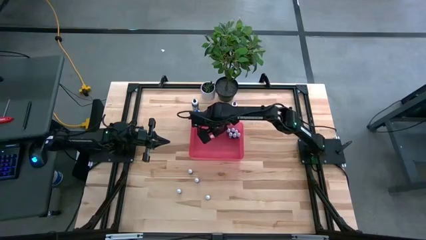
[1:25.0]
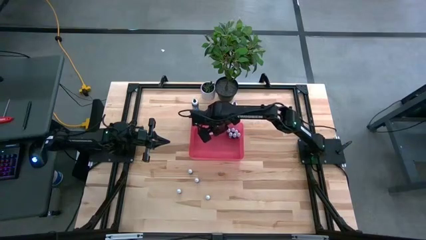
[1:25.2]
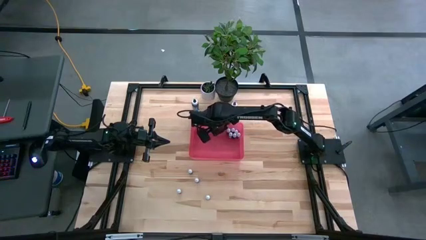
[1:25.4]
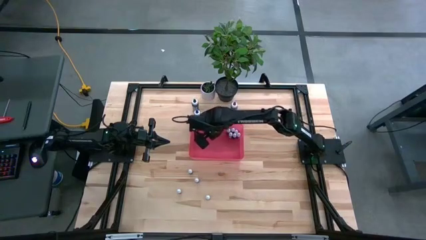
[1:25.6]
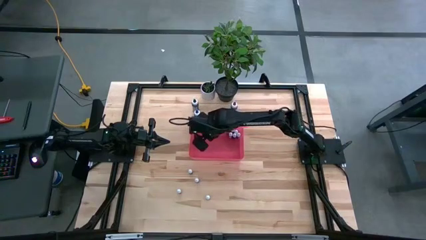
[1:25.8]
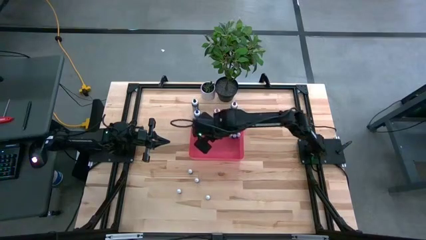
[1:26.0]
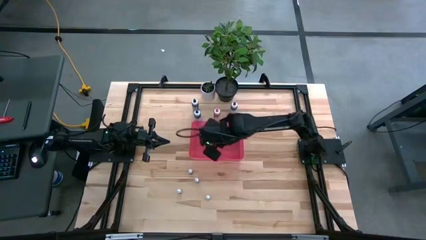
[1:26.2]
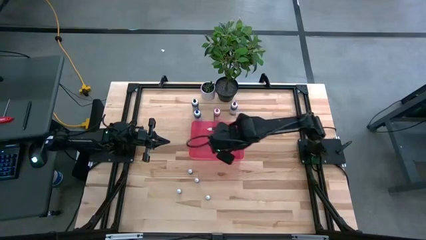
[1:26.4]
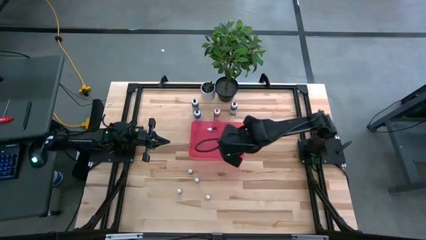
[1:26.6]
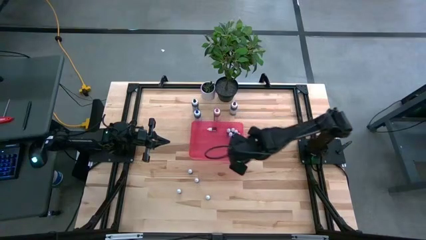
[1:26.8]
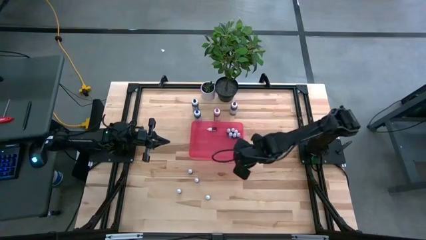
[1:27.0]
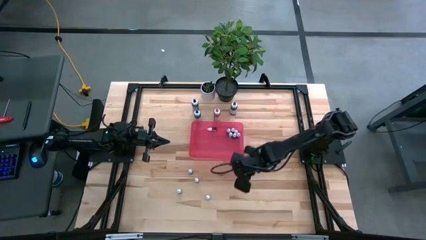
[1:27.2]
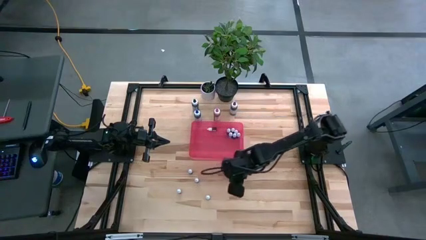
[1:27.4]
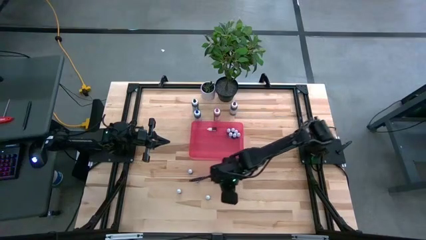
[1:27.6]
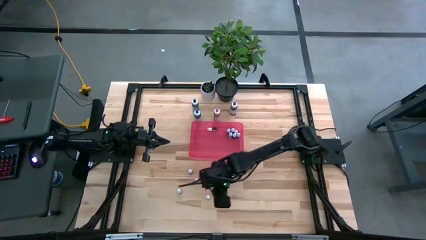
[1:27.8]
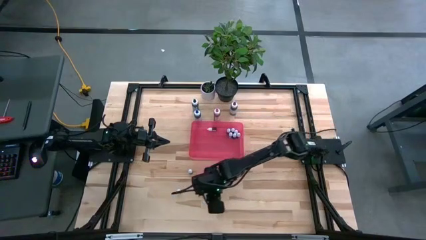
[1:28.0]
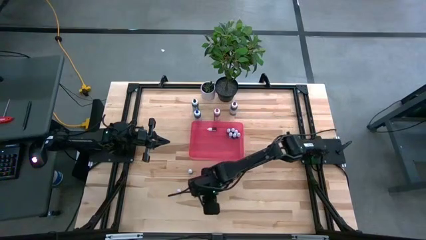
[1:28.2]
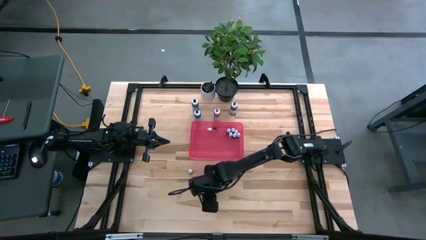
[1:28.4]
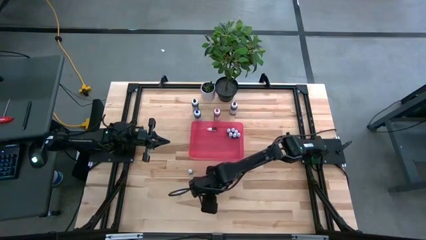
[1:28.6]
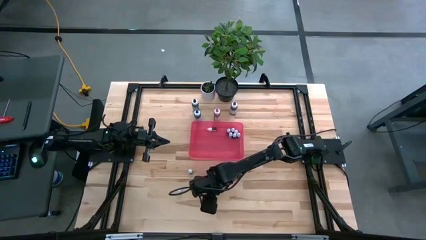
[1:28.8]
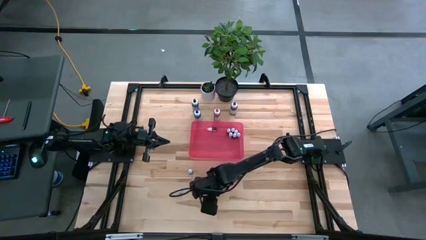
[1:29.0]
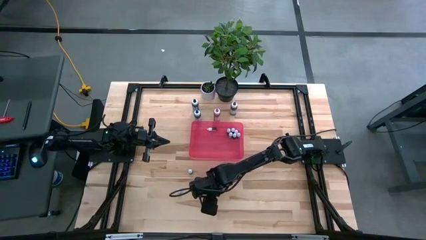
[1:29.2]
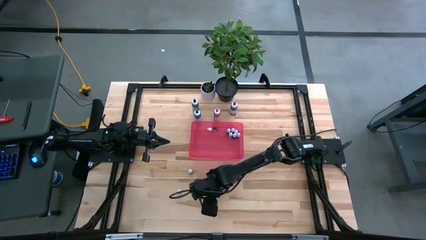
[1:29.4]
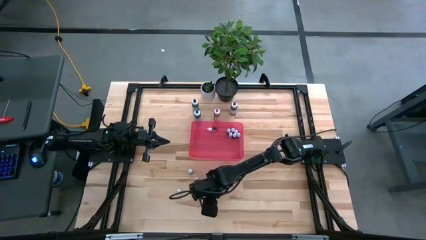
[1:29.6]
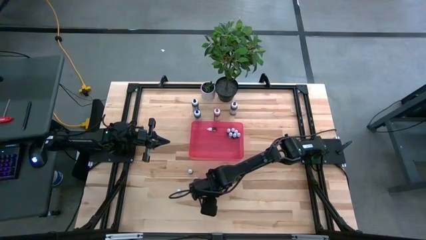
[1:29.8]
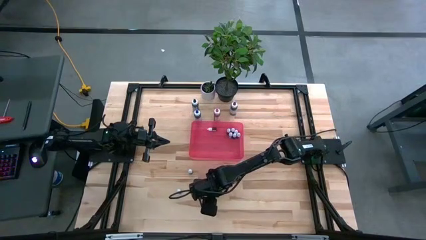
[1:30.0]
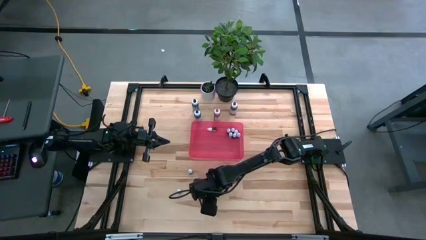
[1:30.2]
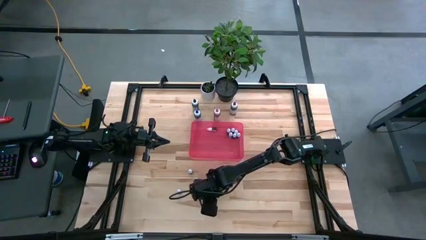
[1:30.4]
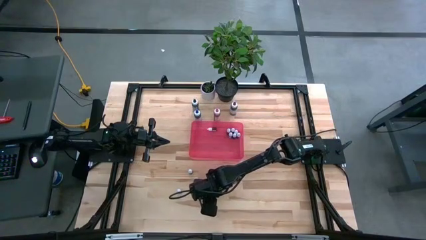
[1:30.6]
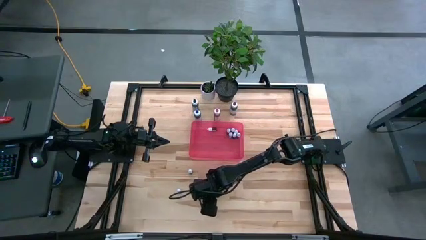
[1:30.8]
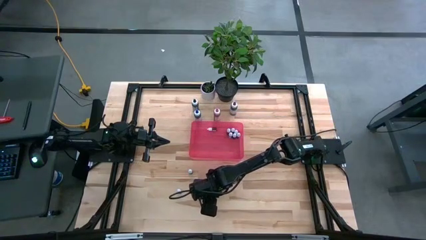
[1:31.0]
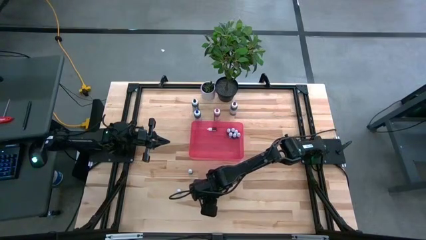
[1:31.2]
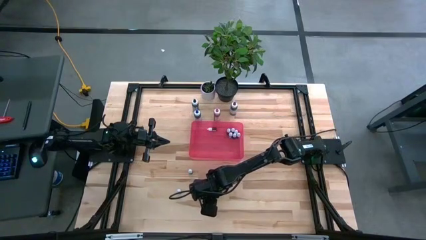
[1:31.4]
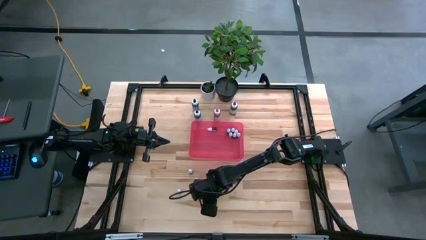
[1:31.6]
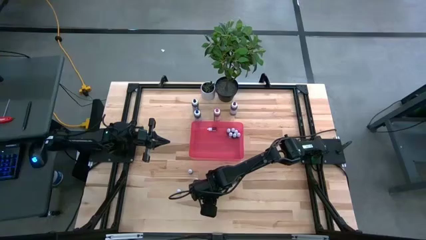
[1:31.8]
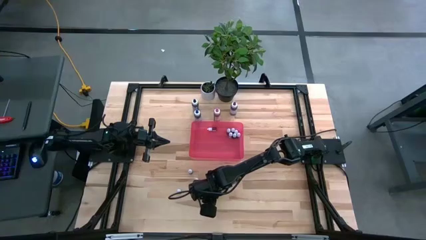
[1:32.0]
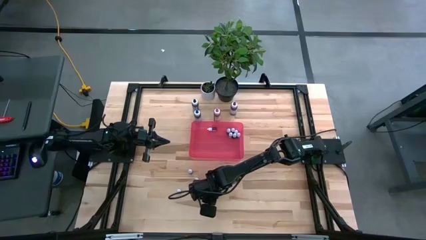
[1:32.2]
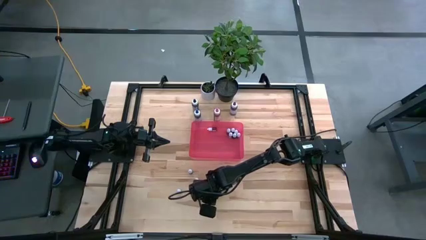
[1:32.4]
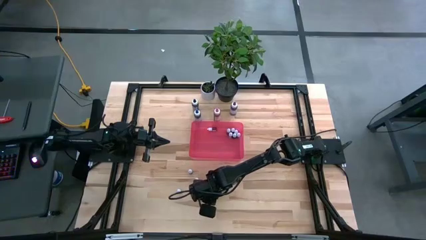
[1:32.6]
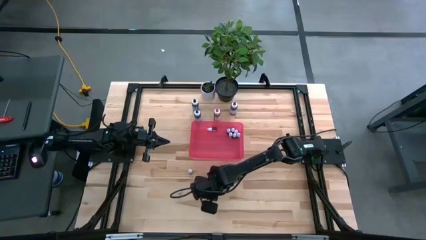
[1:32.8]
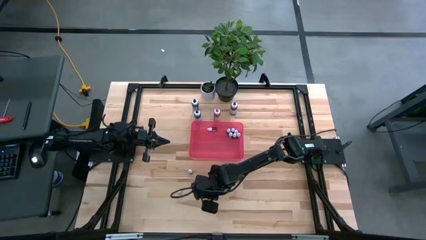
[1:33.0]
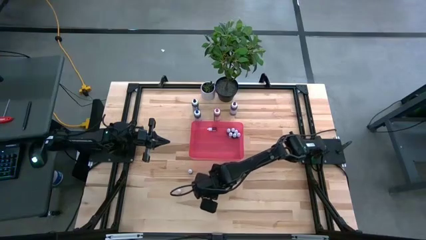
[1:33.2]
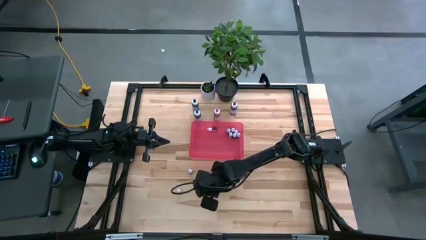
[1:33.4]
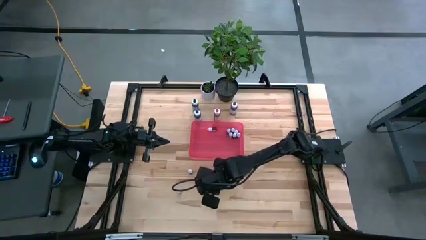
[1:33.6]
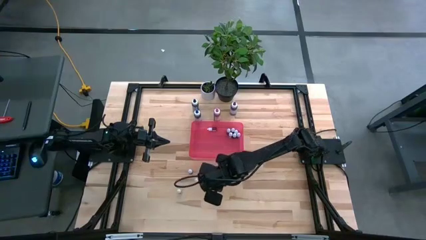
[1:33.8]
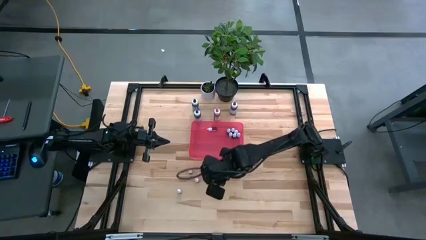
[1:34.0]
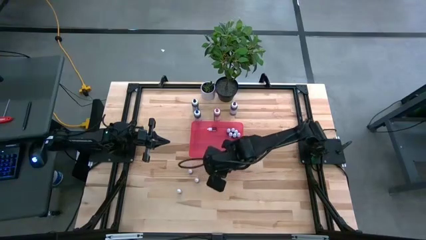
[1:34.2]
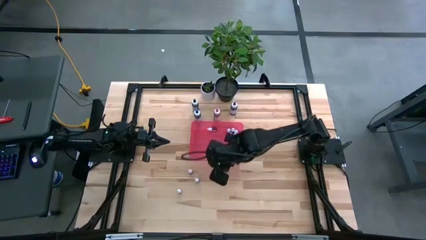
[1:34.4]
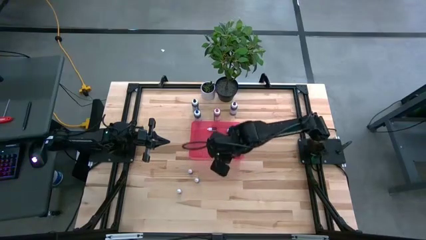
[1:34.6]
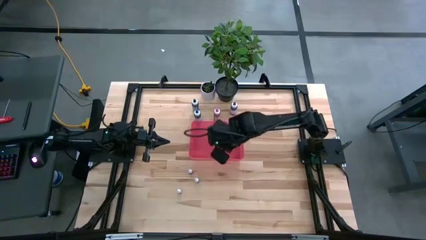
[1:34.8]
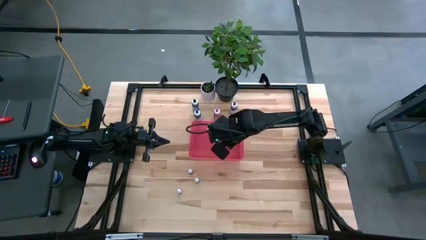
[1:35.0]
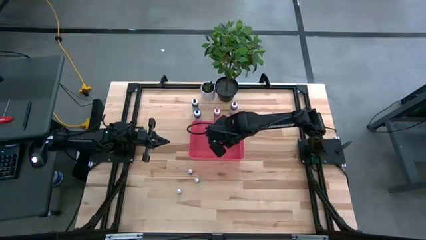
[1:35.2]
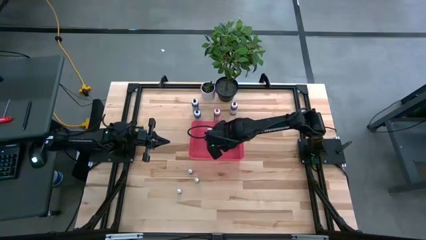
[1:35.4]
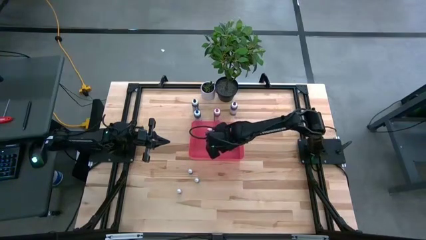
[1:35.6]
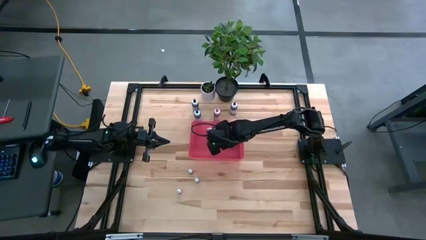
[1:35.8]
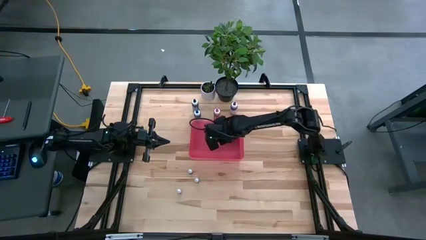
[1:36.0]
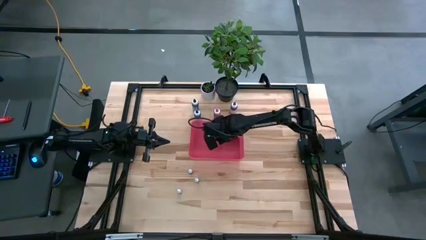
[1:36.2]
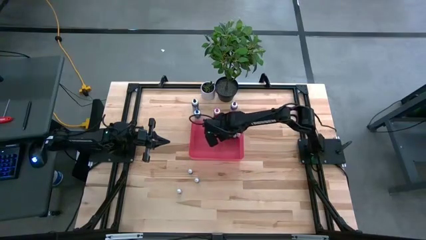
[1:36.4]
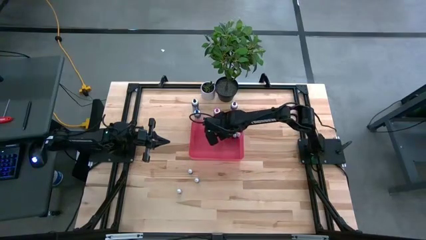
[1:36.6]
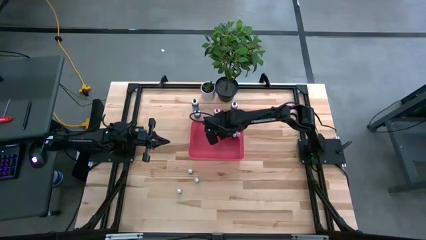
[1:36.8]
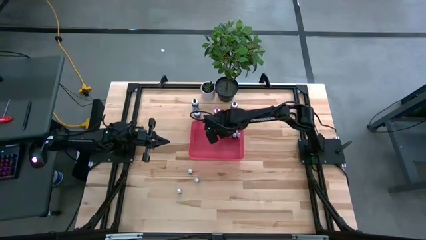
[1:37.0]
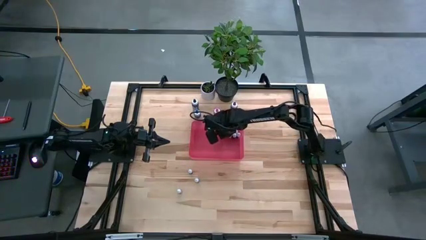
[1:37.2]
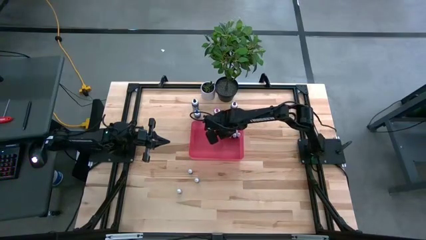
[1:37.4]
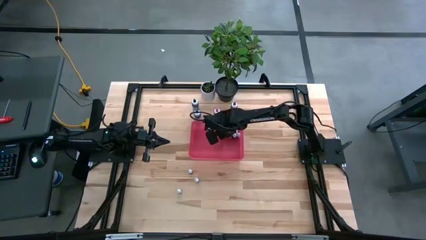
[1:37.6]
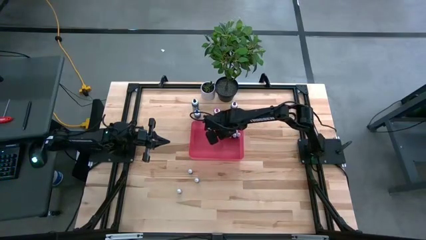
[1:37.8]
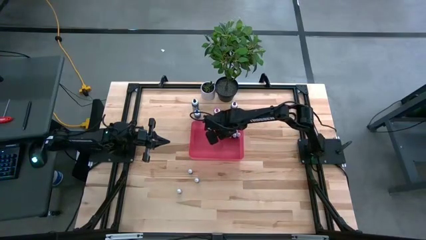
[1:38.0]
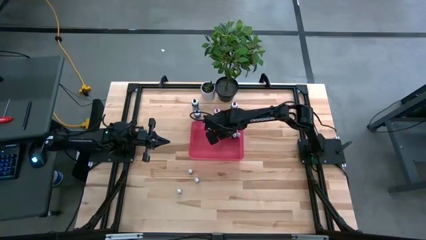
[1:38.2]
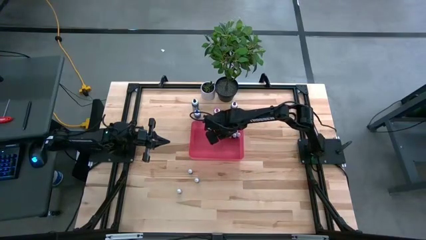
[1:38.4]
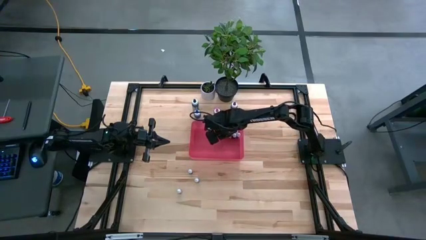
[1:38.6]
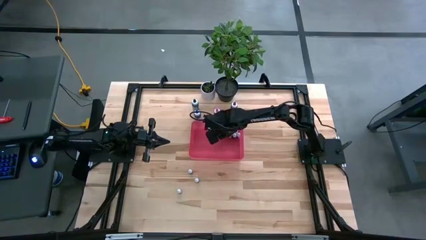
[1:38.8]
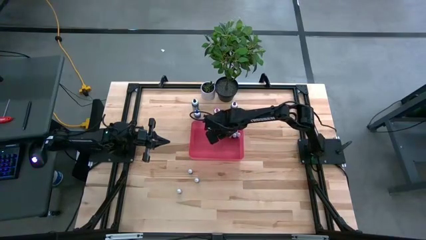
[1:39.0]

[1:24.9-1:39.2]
Task: Pick & Place food coloring
Put the small green food coloring bottle into the pink container
